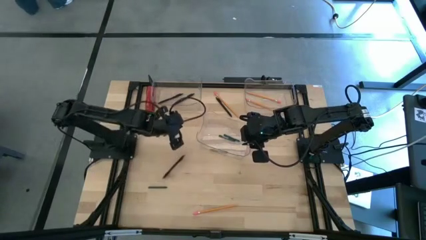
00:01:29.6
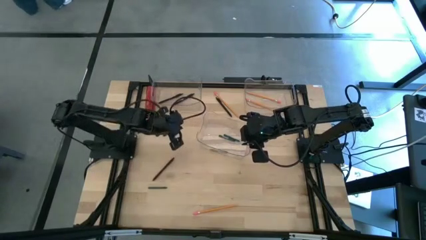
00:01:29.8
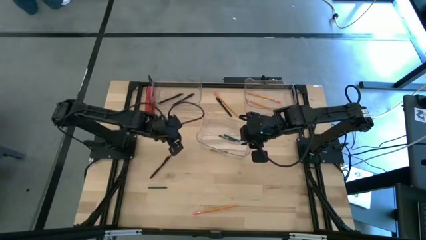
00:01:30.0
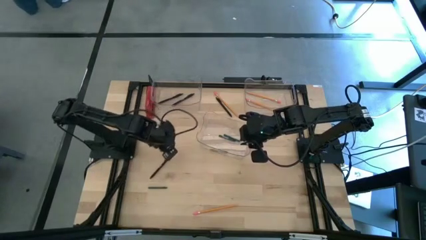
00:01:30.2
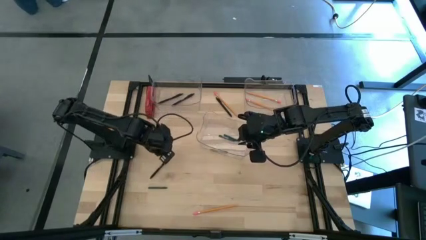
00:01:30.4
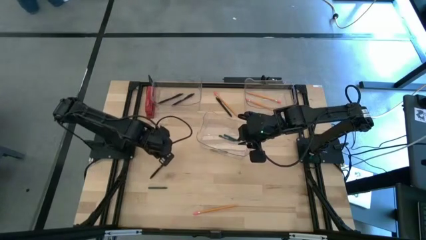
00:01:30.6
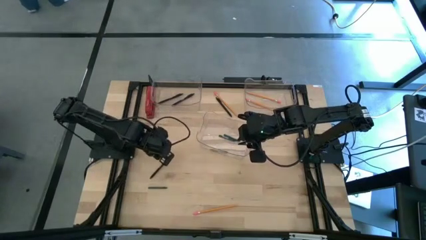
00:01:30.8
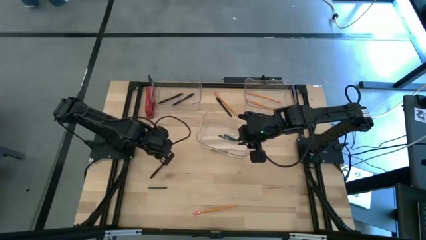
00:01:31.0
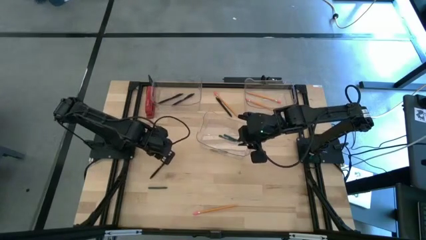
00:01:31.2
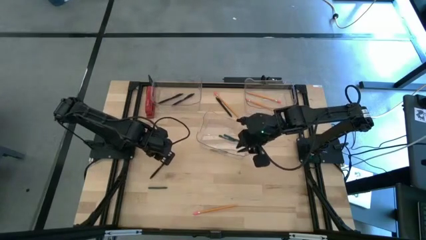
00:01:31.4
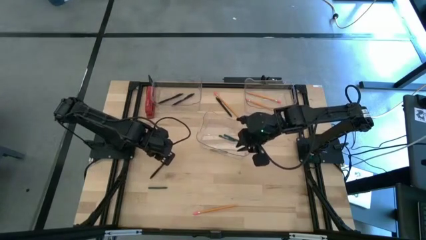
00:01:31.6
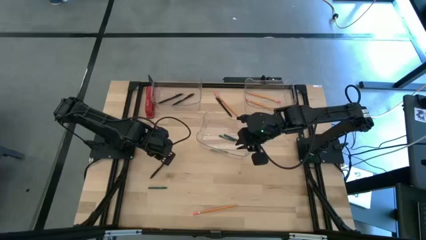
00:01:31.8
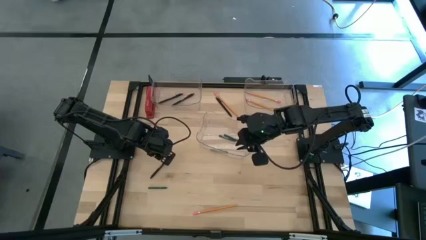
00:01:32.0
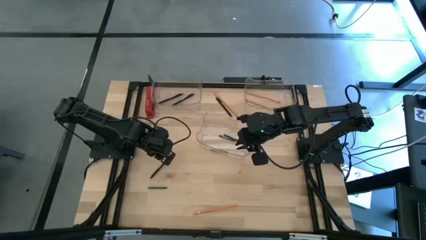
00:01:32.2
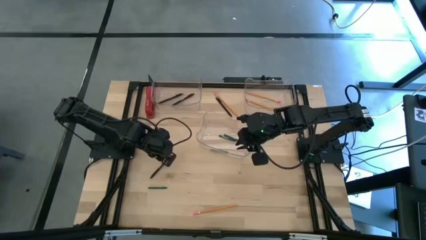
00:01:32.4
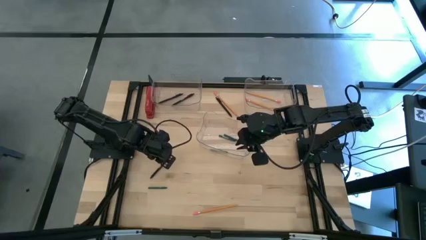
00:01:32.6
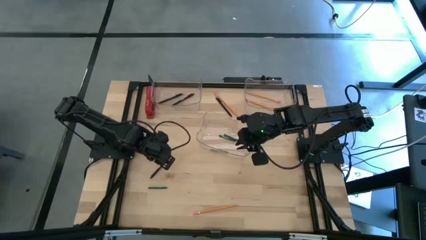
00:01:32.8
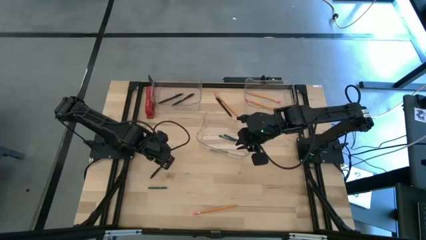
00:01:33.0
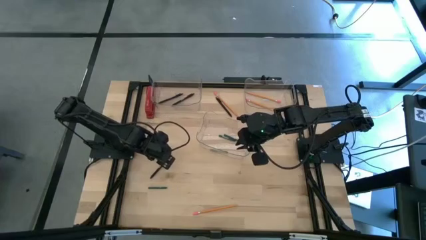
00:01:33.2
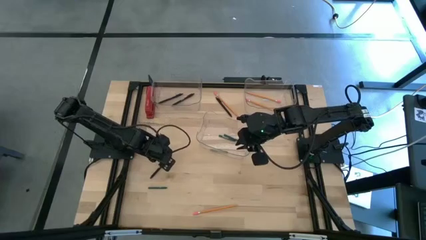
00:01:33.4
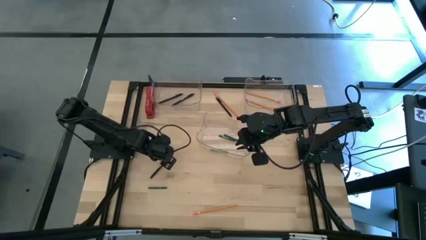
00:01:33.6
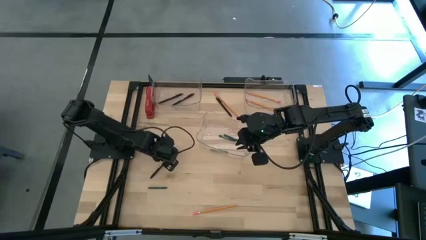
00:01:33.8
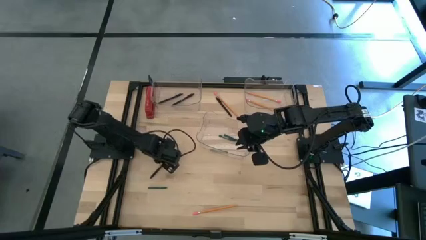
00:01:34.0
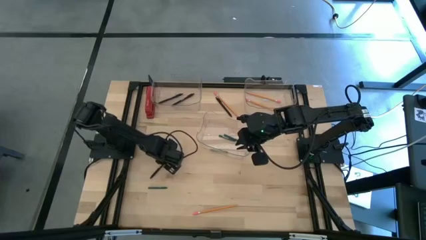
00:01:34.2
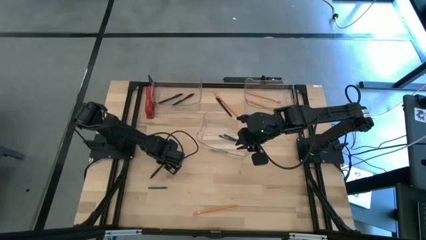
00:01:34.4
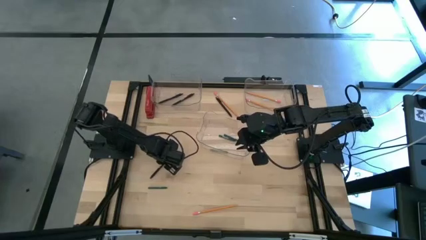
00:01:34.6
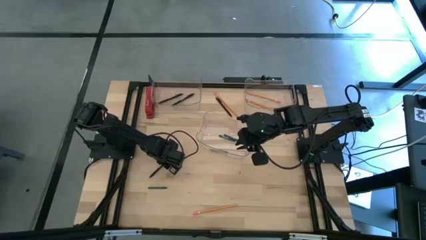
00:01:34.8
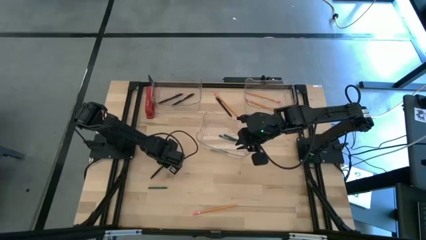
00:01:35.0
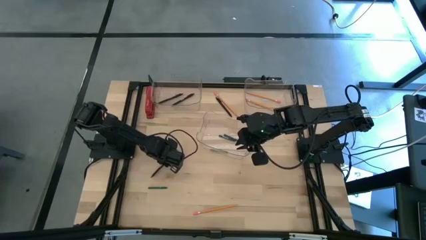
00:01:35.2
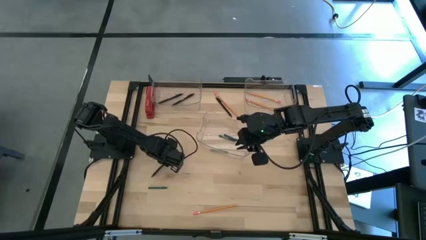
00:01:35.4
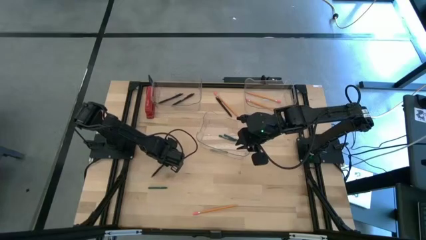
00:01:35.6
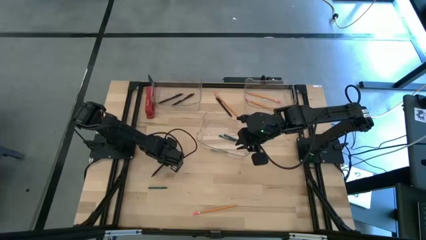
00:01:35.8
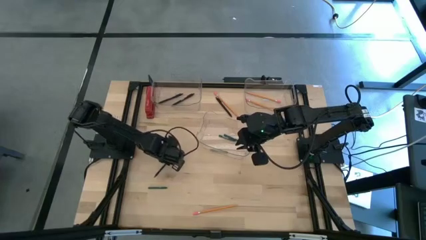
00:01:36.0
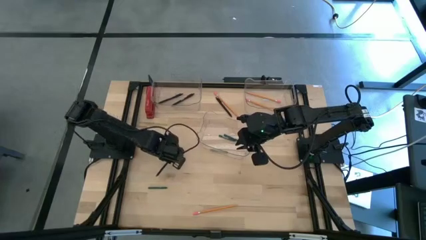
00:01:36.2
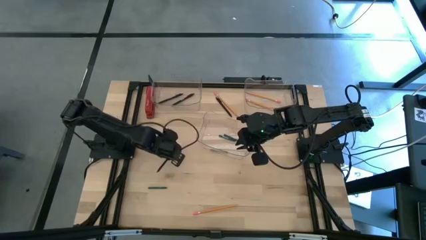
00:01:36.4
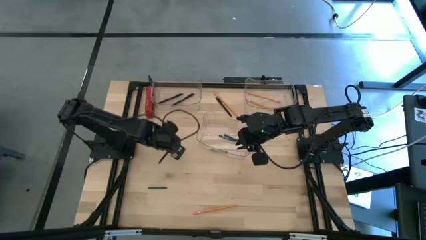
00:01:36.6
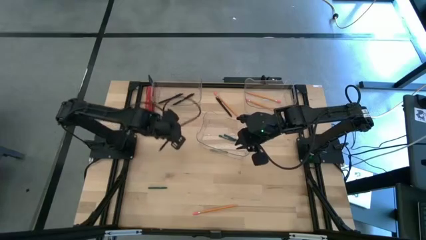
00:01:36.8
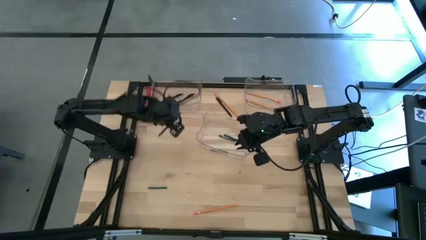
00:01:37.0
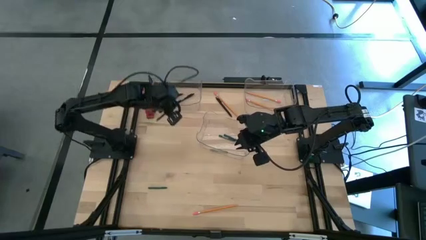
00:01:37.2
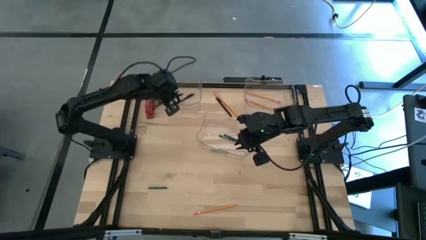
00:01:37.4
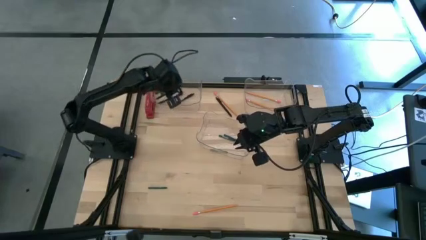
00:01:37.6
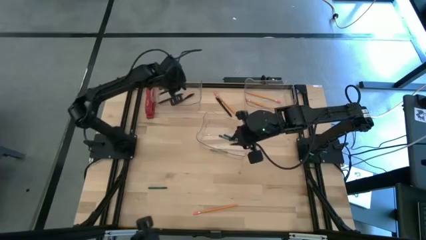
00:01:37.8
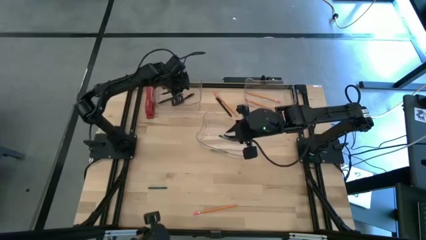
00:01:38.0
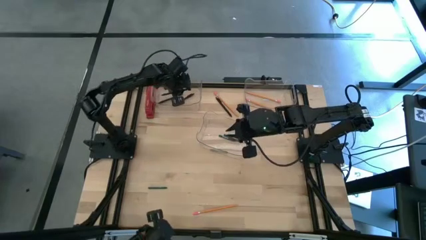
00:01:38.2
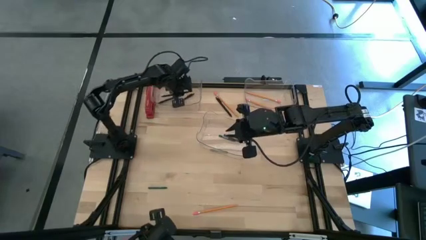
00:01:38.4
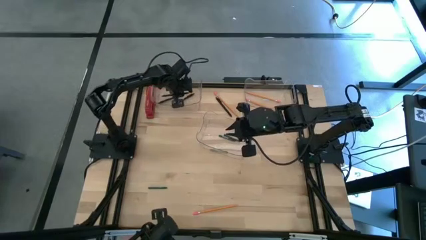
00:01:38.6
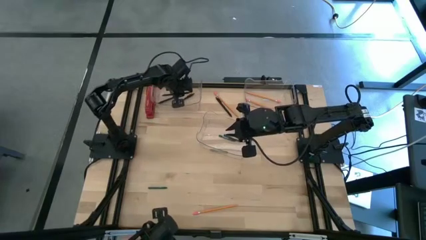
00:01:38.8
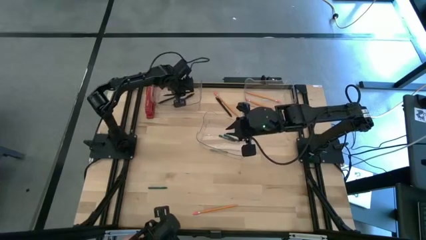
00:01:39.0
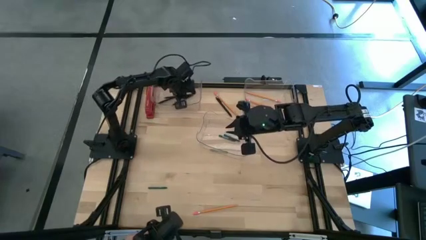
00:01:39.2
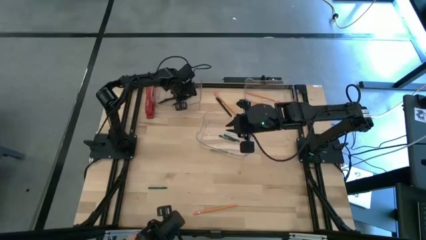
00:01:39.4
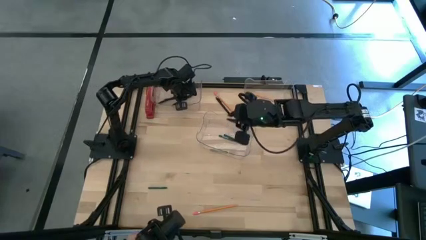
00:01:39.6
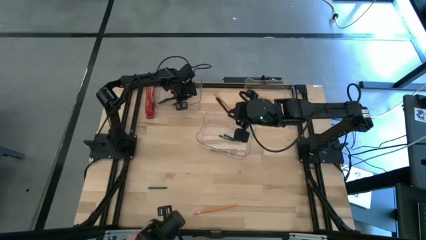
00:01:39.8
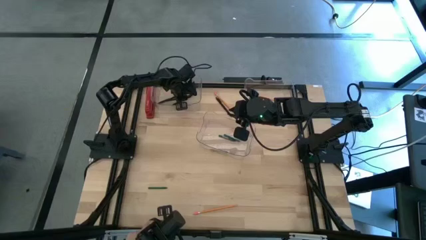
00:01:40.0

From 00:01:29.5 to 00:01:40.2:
Task: Sort crayons/erasers/pens/pencils in bins
Put the black pen into the top left transparent bin

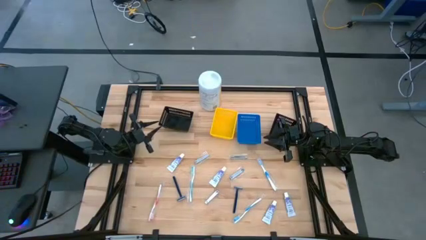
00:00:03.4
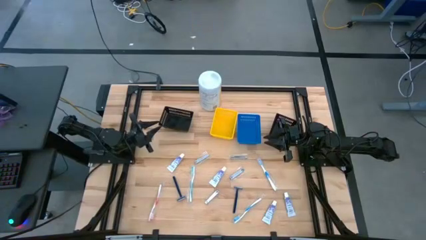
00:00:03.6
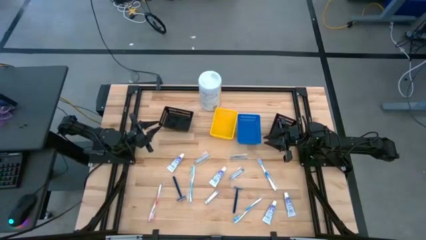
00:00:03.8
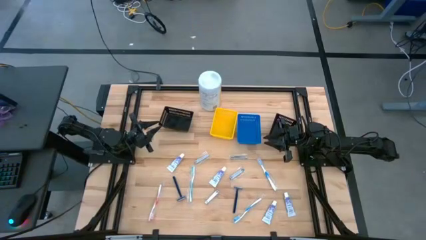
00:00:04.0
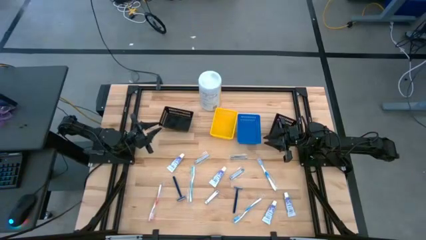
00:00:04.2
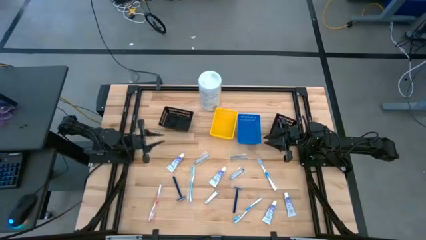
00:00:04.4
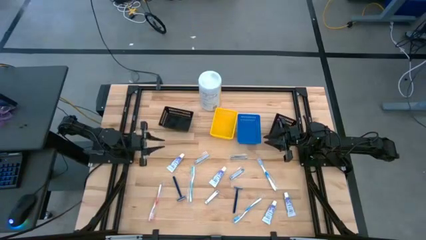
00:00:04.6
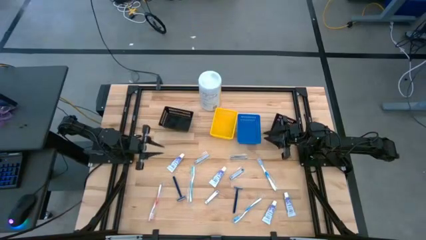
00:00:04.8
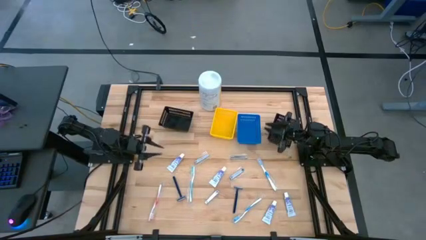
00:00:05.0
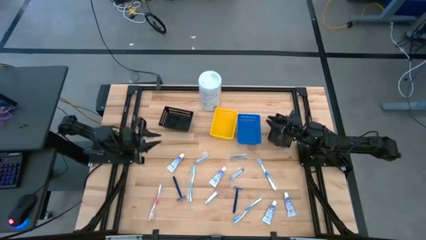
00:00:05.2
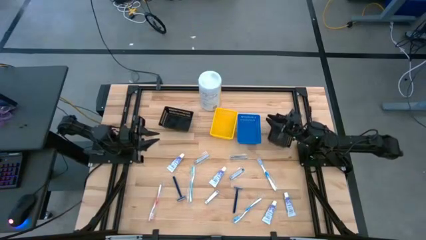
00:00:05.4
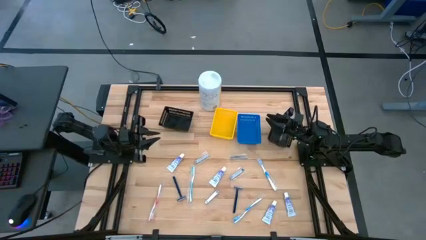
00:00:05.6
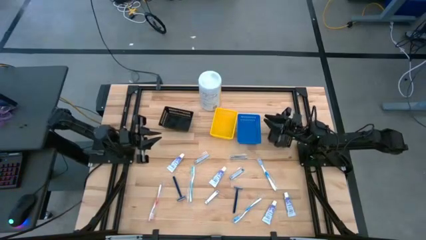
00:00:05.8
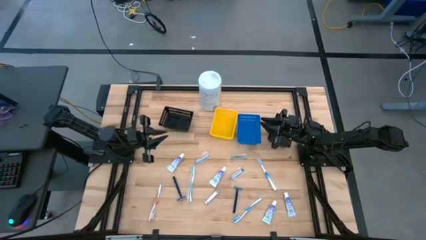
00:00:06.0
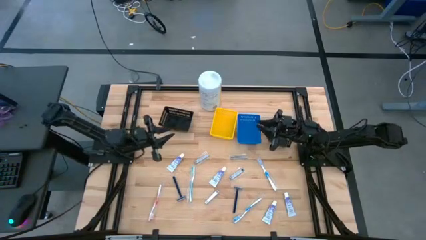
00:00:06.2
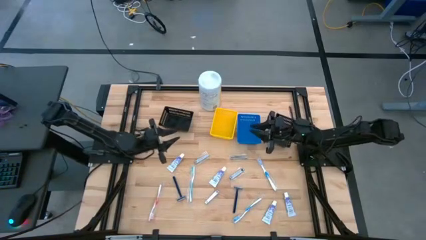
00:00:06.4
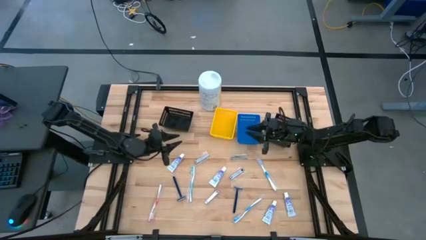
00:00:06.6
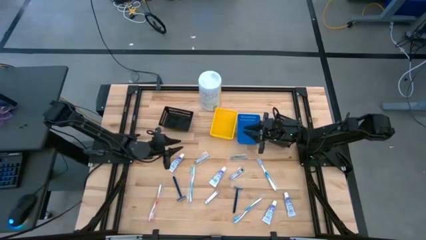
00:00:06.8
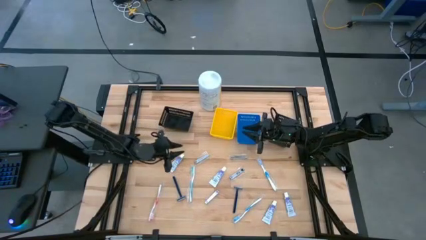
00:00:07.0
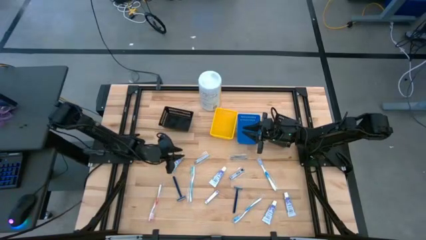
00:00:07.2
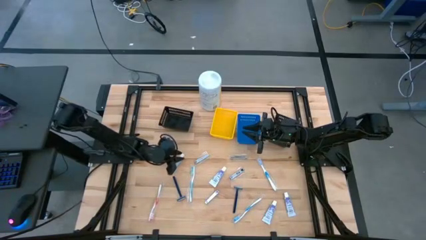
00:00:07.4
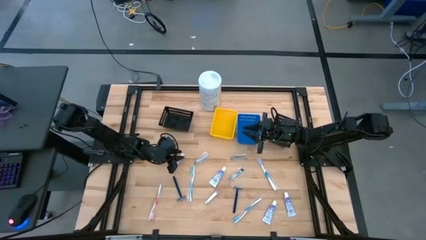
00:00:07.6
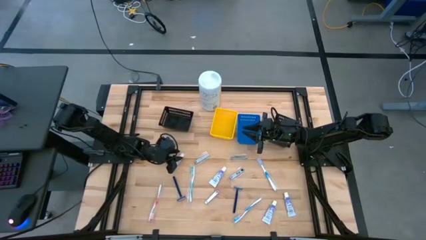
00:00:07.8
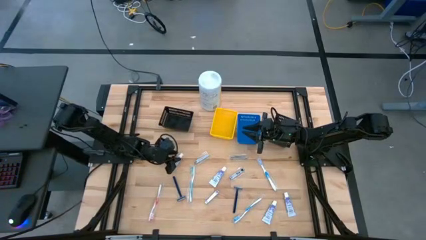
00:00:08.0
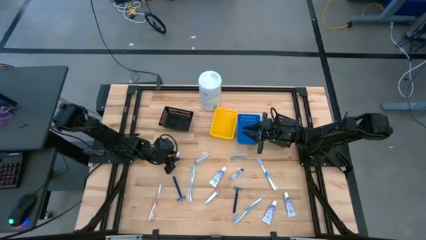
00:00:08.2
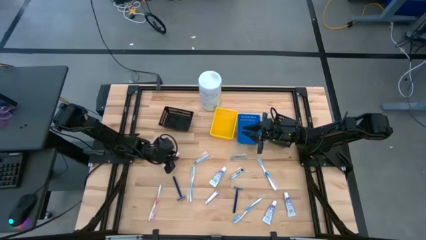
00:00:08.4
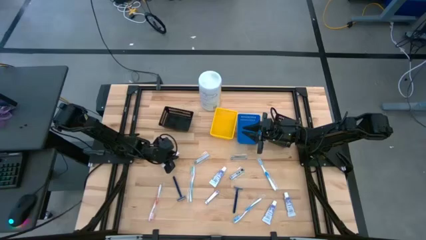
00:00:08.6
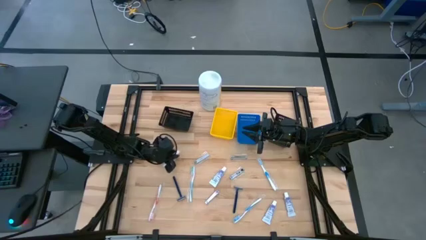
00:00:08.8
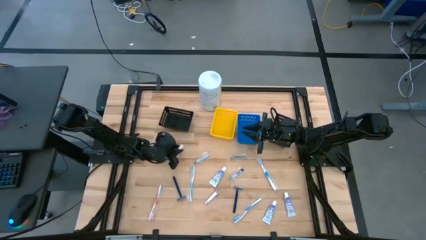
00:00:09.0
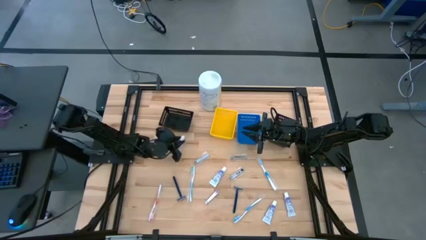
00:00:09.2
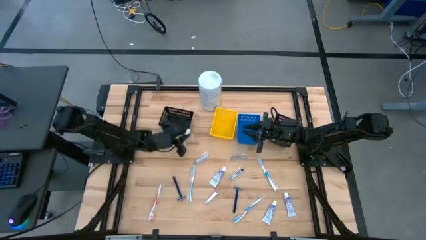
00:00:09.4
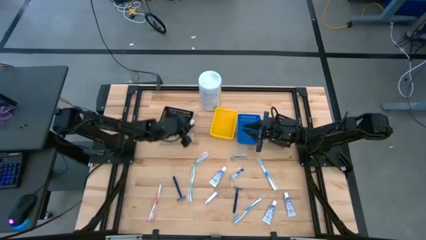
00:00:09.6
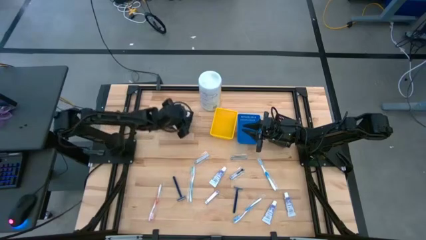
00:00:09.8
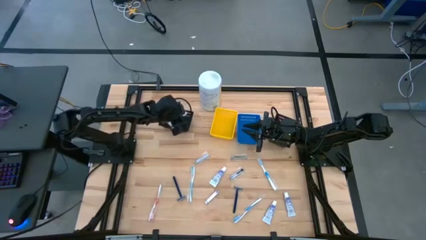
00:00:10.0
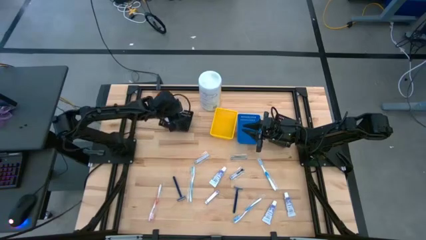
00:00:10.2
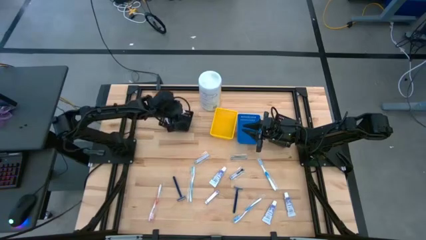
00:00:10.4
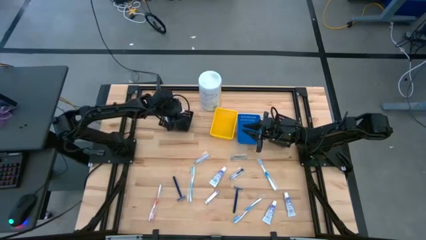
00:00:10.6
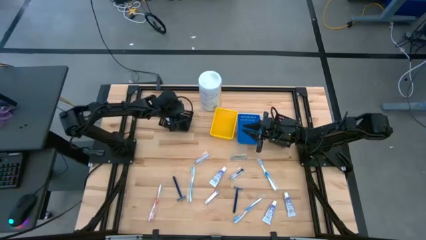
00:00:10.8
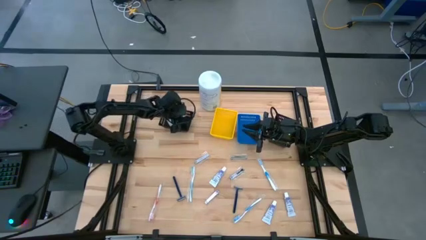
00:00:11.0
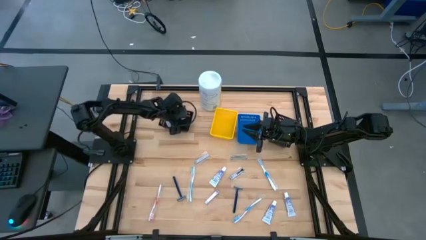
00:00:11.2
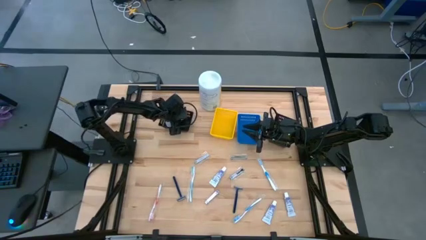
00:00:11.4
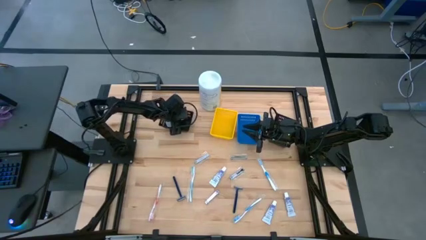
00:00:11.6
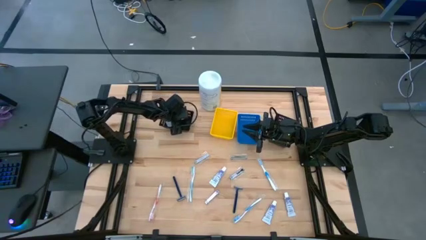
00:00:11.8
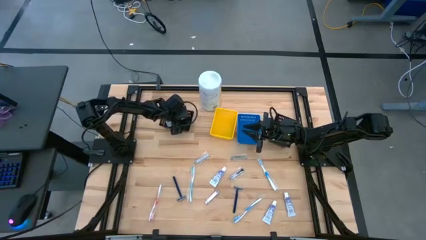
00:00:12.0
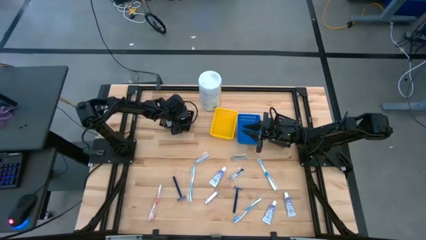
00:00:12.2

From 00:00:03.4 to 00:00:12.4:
Task: Pick & Place Travel size toiletries
Put the white toothpaste into the left black bin
